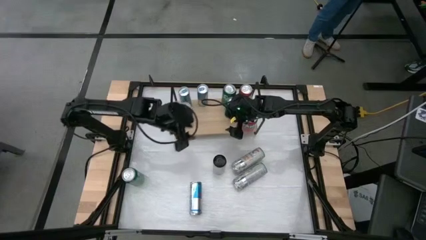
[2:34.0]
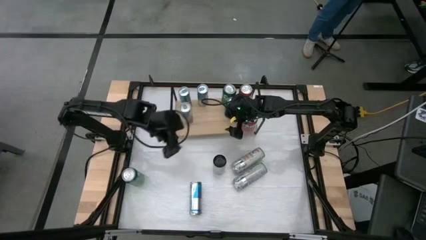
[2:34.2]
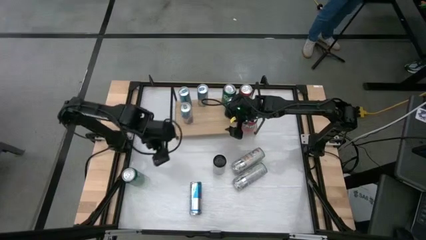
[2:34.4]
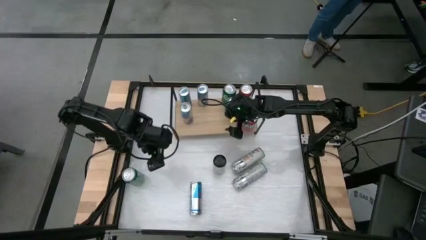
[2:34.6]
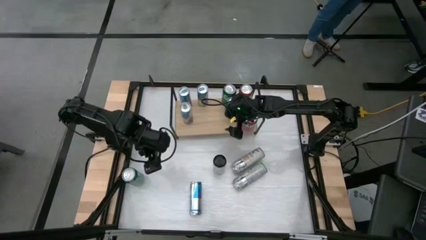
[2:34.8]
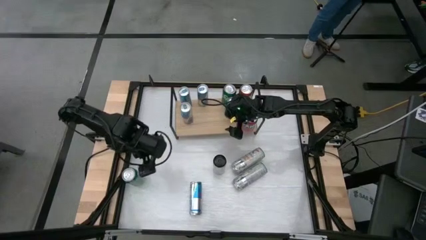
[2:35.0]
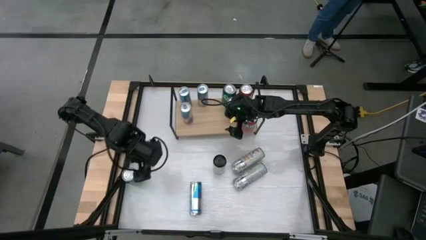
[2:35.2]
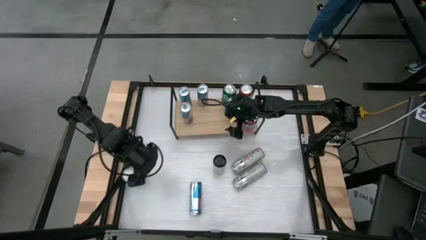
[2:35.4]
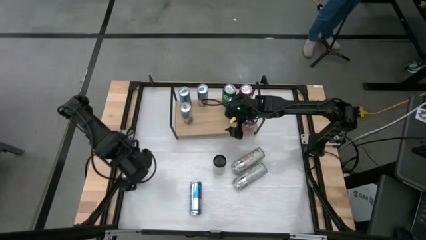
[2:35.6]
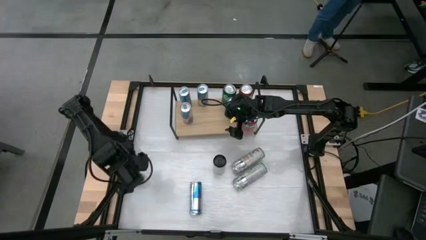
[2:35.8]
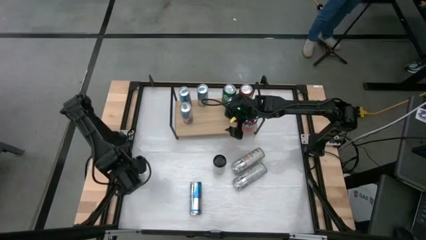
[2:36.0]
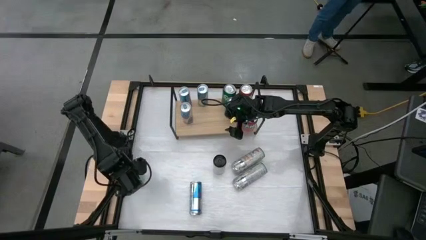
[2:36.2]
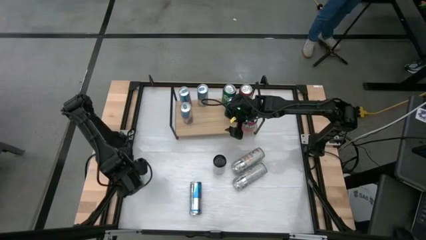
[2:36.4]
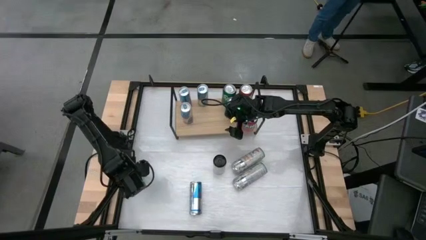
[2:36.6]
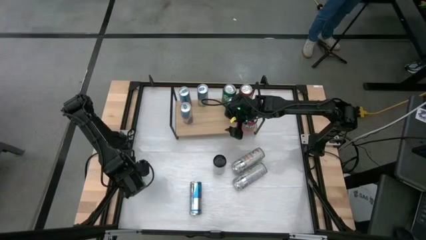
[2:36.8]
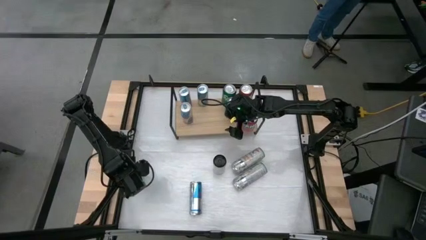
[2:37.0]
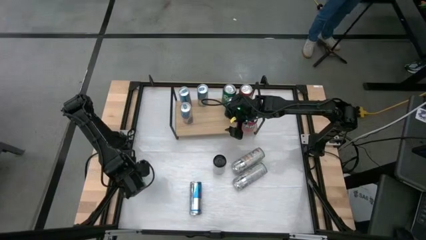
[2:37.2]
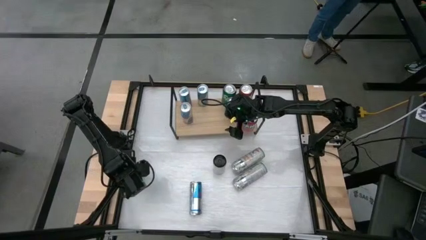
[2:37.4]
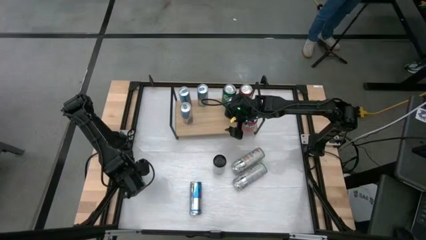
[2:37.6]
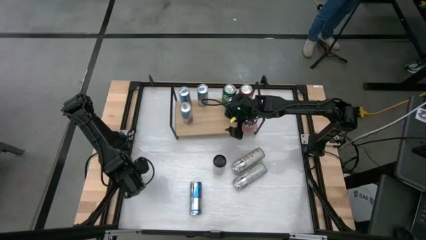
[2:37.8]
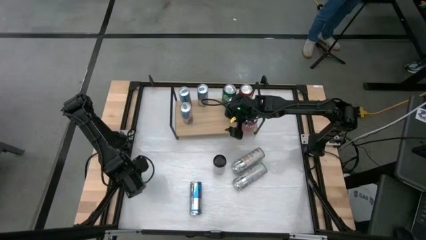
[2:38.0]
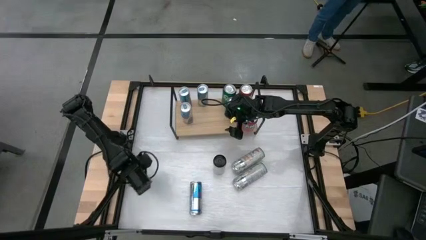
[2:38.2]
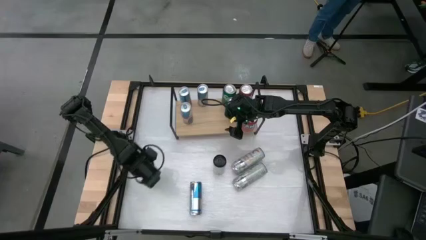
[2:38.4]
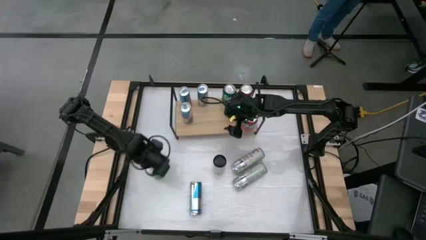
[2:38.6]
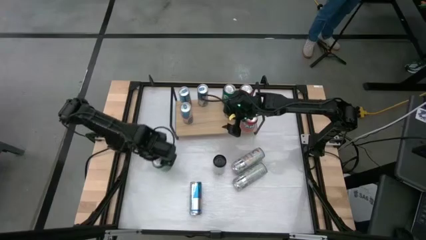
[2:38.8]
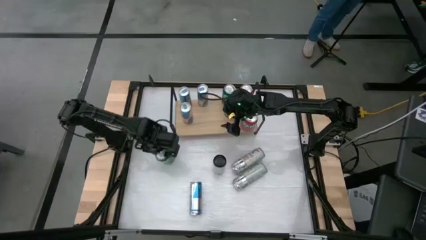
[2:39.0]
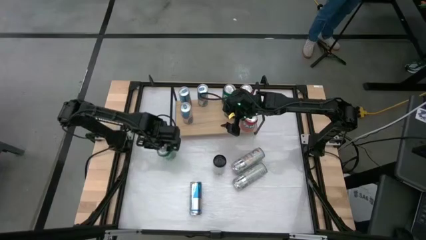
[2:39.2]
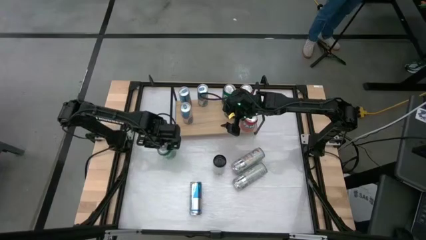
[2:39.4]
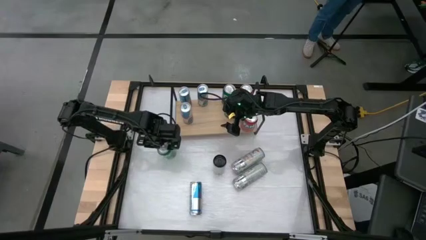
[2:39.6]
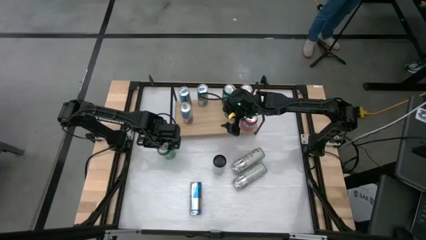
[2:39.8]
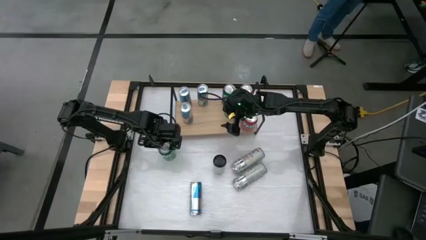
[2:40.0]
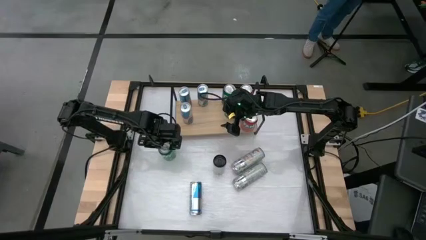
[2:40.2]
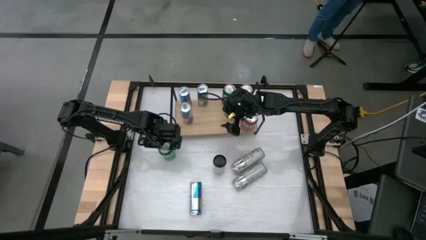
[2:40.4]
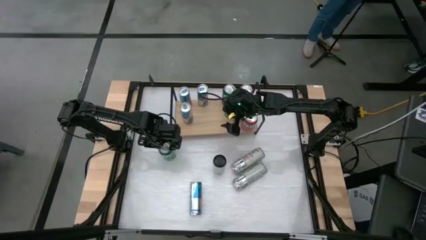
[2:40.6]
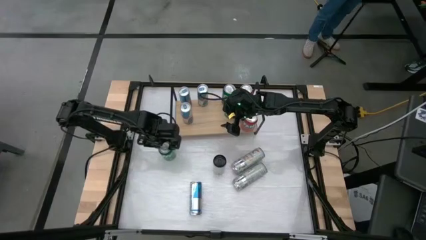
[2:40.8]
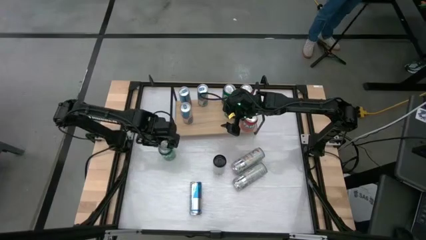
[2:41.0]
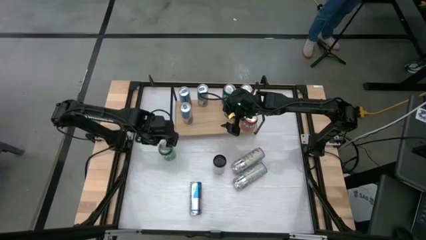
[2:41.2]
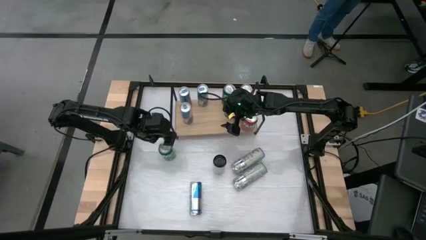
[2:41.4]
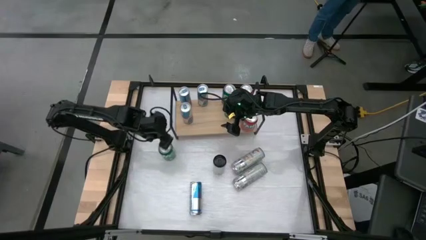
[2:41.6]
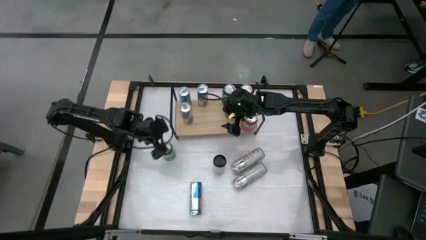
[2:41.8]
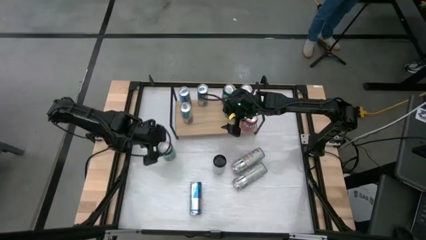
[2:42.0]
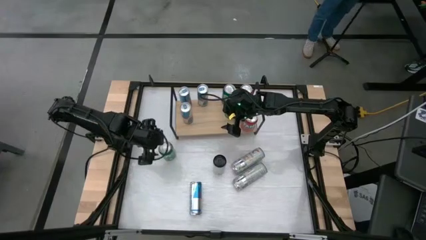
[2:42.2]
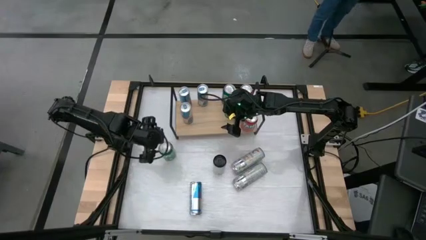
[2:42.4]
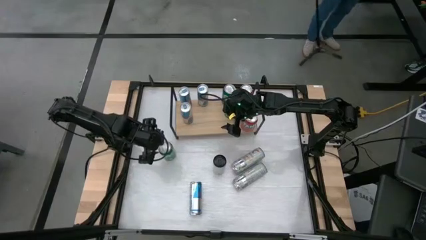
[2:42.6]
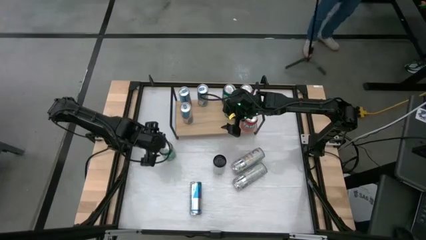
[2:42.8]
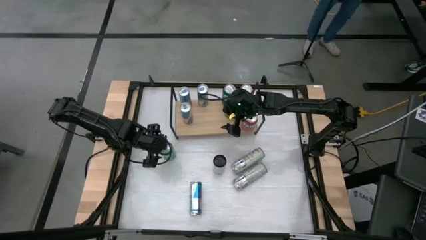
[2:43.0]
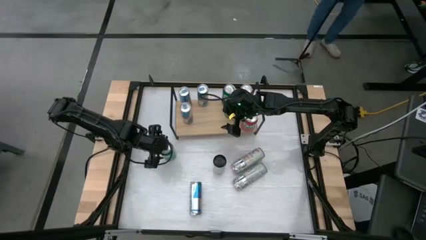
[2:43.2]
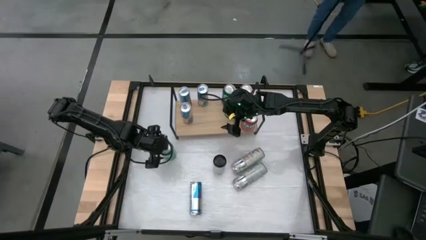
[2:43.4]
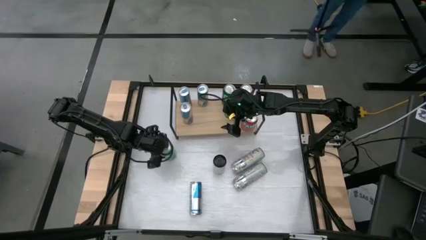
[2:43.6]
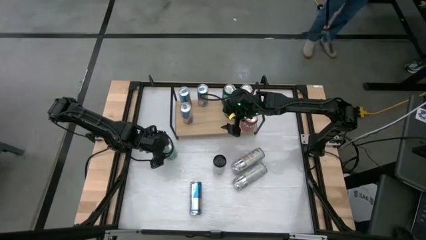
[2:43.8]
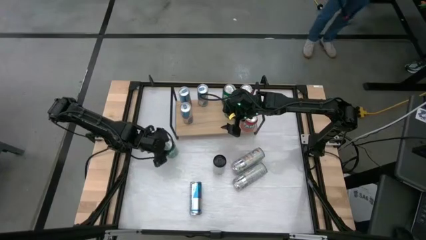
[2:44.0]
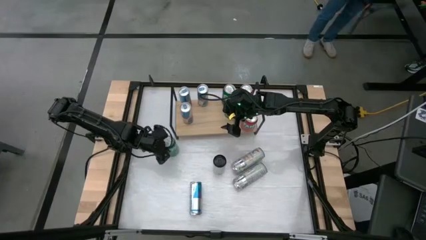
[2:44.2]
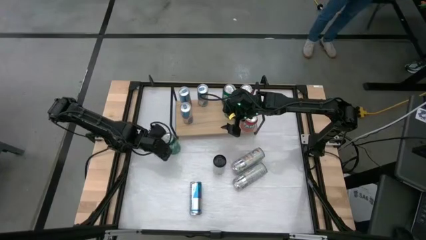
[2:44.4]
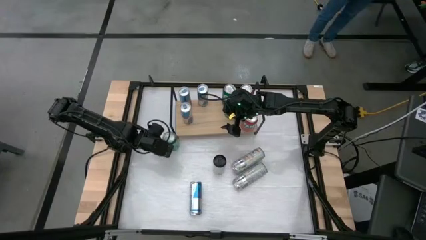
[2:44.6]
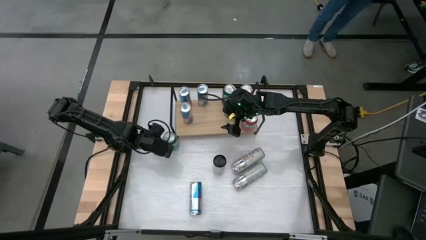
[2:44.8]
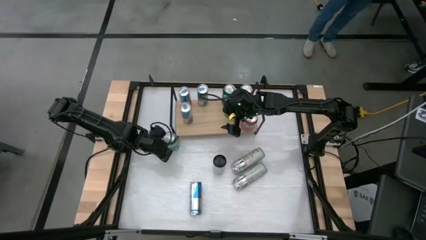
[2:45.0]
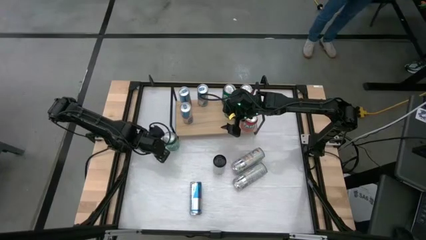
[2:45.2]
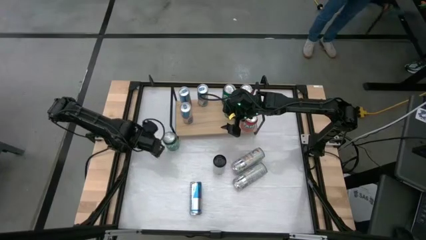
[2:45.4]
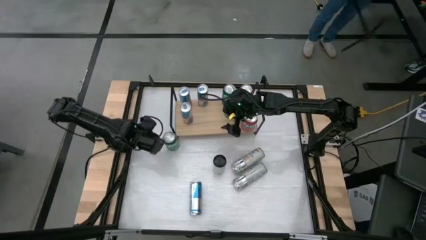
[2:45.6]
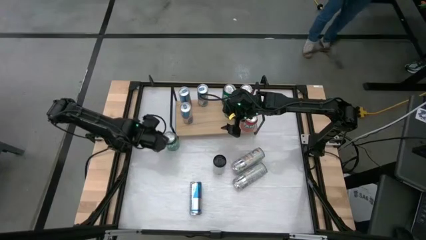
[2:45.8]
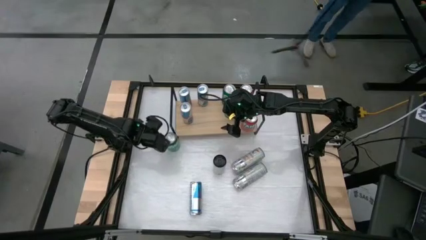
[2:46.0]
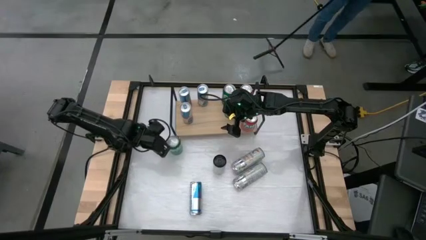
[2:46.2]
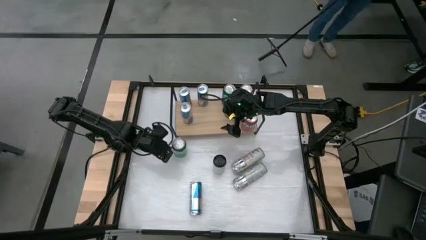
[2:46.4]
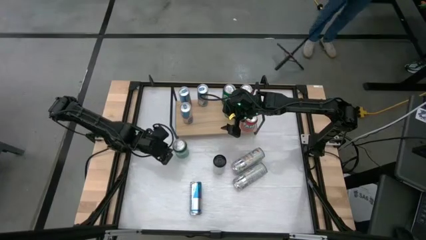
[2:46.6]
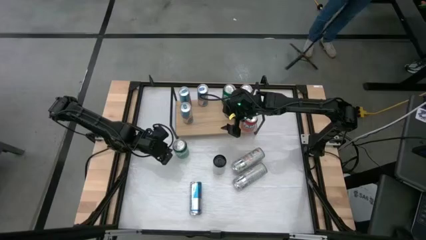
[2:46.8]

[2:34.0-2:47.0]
Task: Sort soda cans
Put the green soda can on the shelf and align with the other green soda cans
